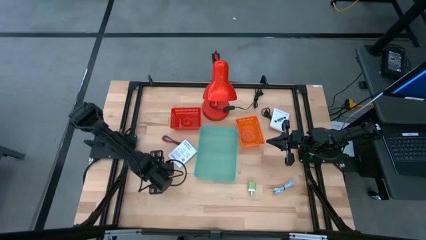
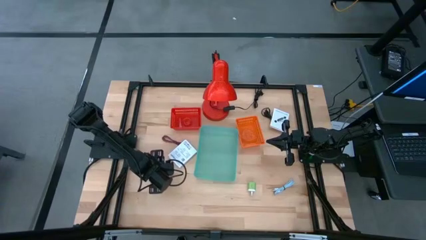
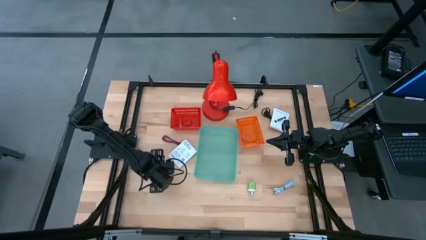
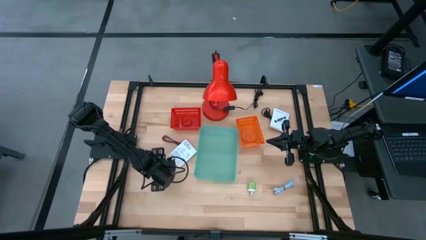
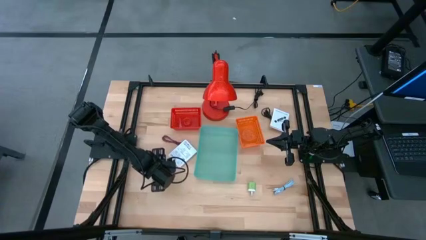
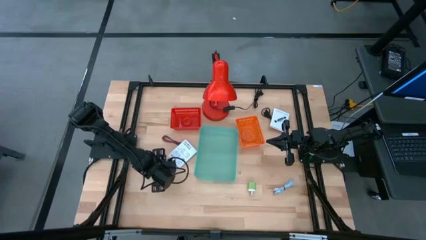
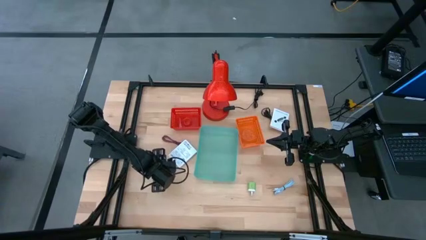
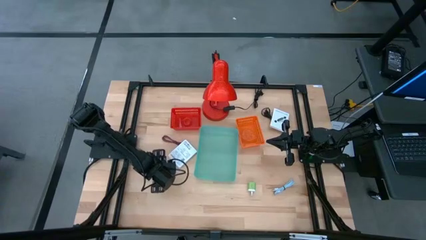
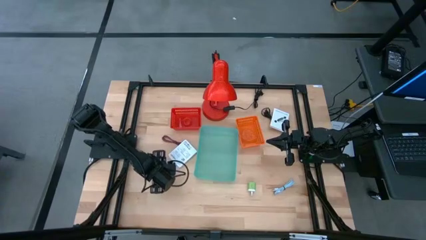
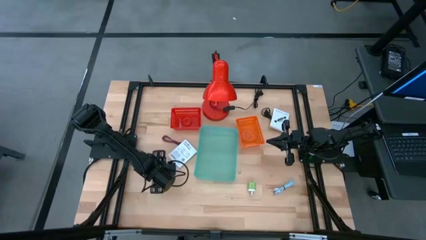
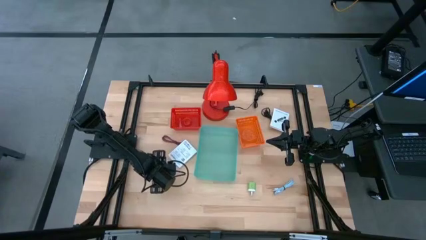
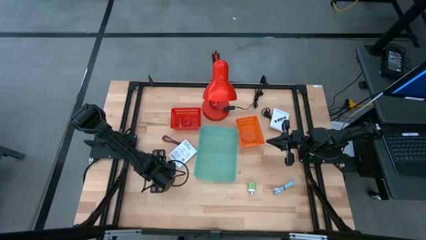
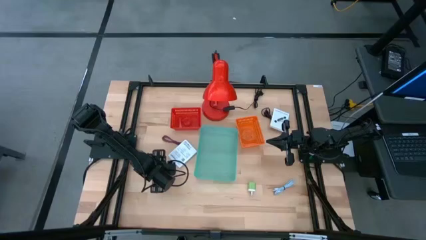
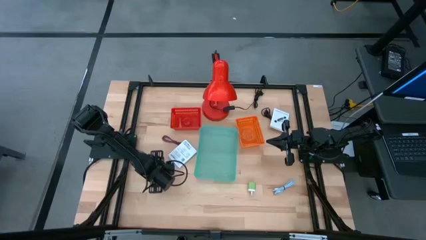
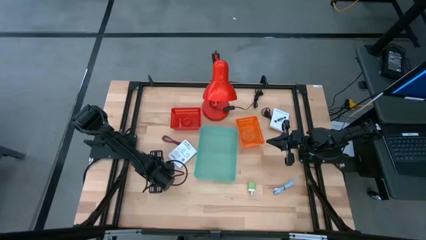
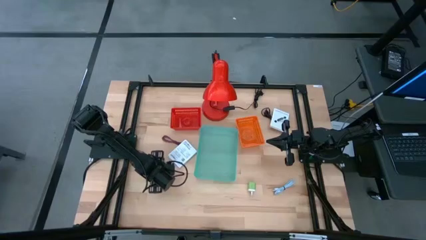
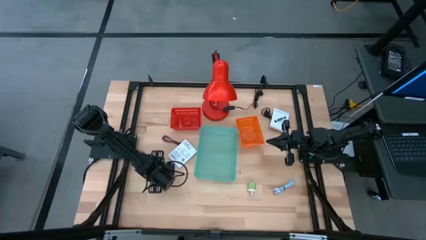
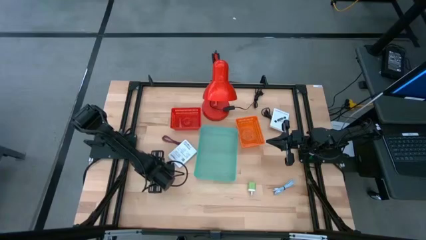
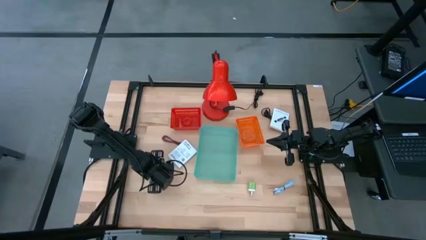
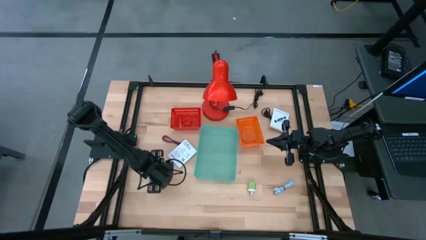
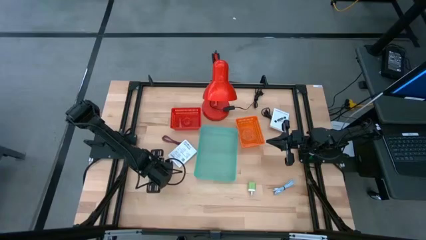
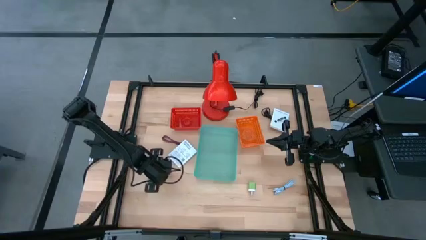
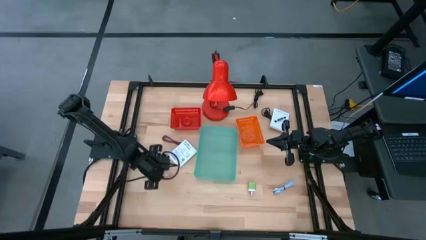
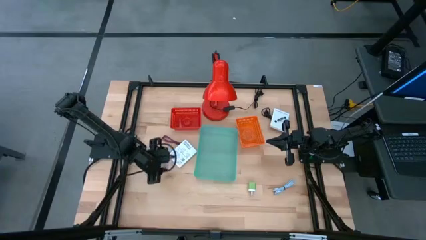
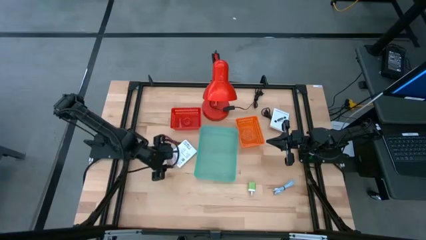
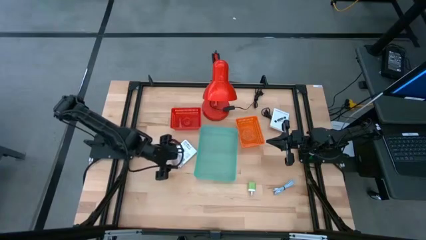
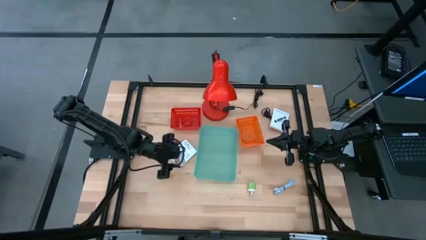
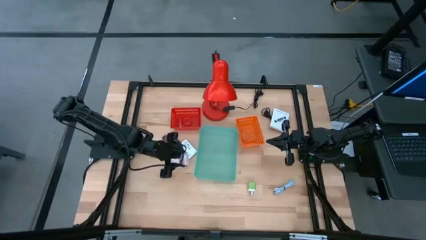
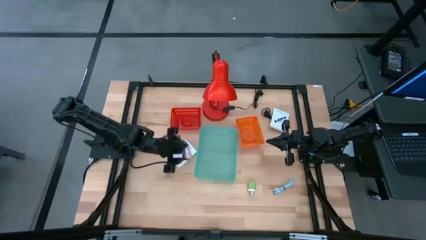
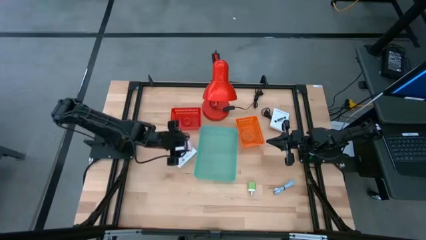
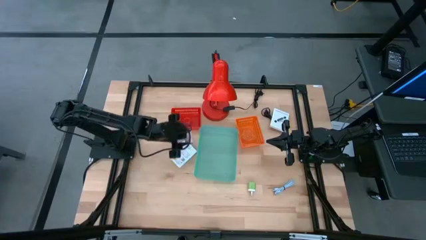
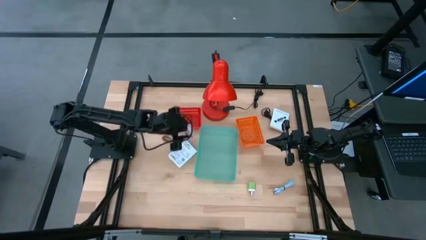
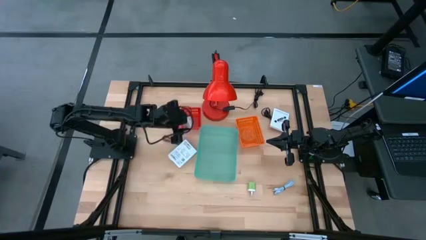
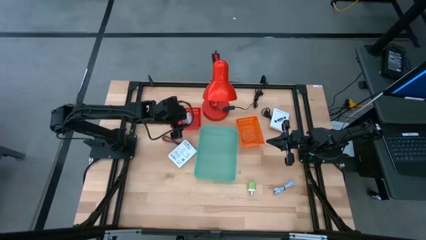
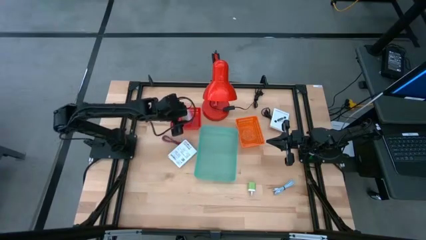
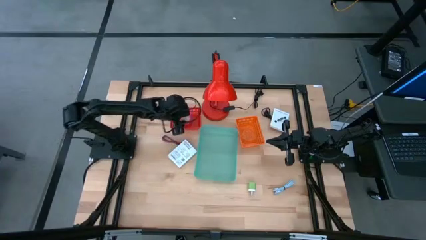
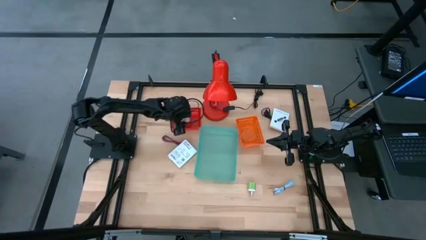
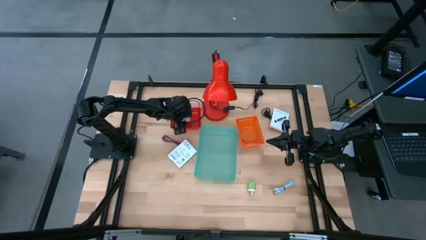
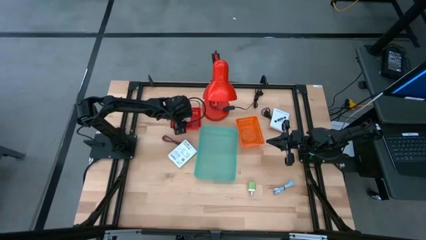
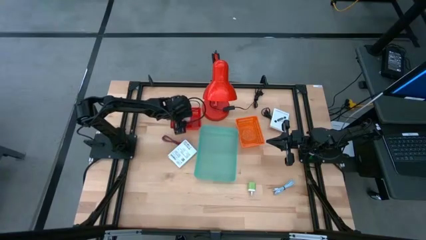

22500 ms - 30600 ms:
Task: Pick and place items into bin
Put the pink charger adapter into the red basket
